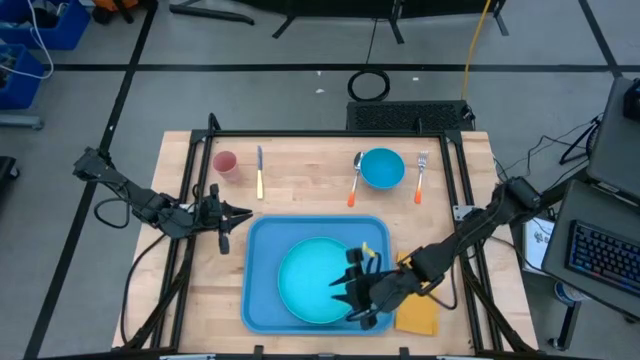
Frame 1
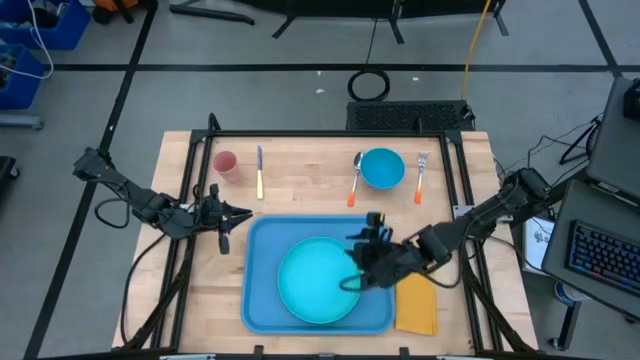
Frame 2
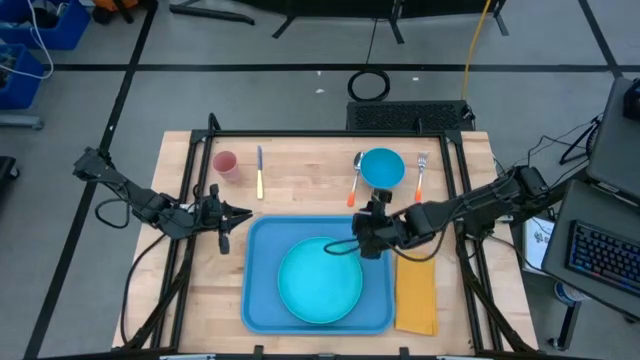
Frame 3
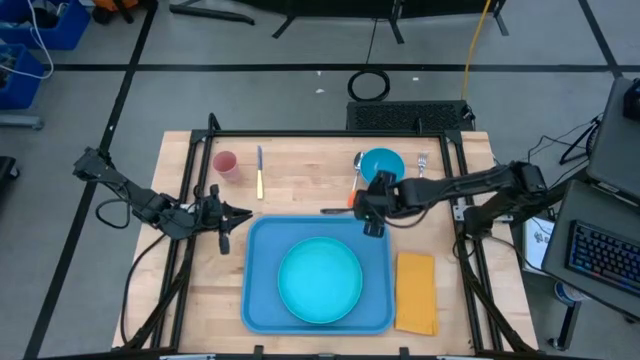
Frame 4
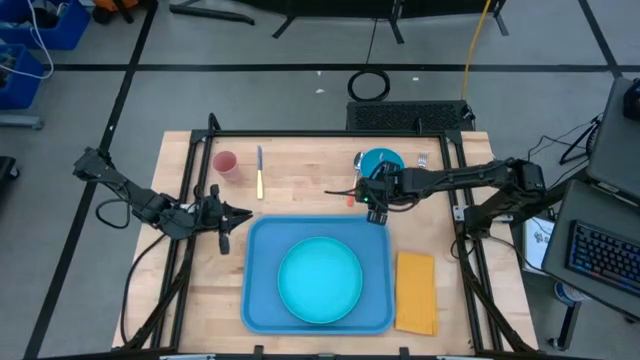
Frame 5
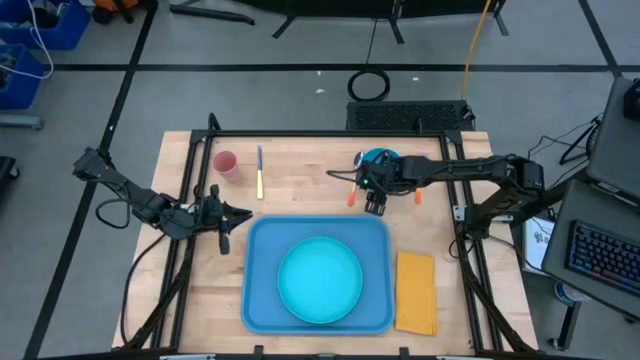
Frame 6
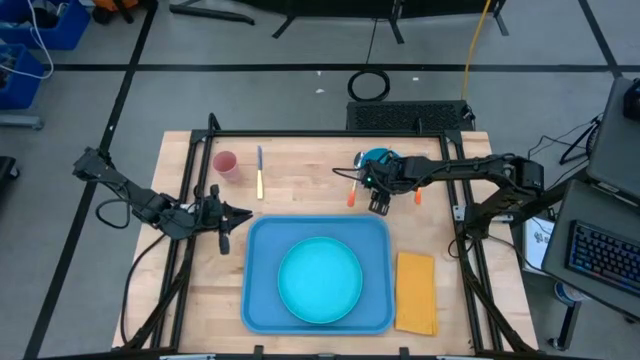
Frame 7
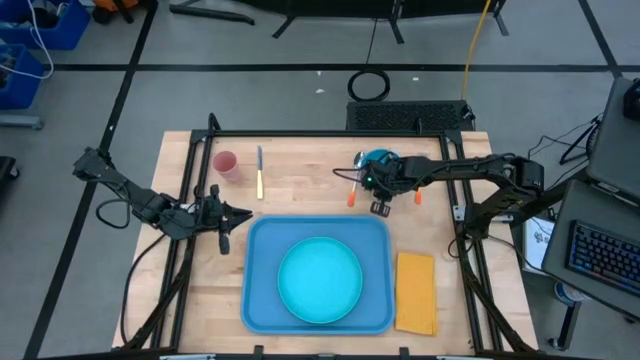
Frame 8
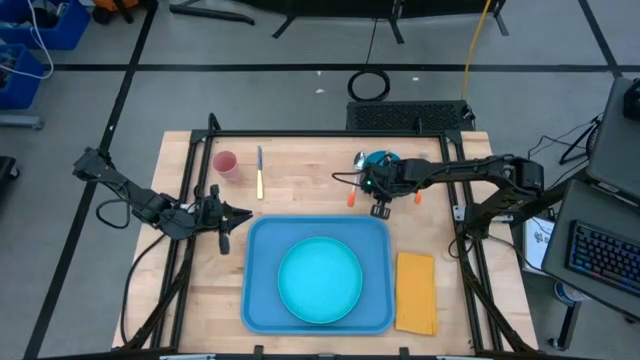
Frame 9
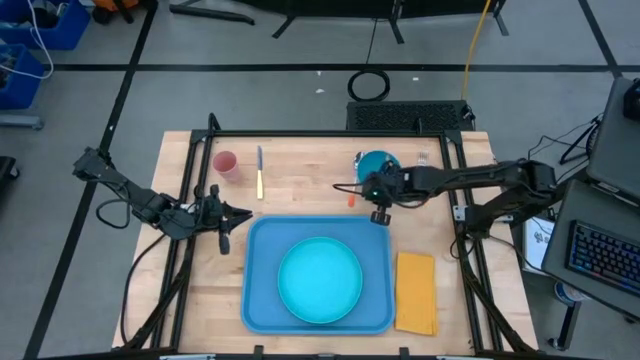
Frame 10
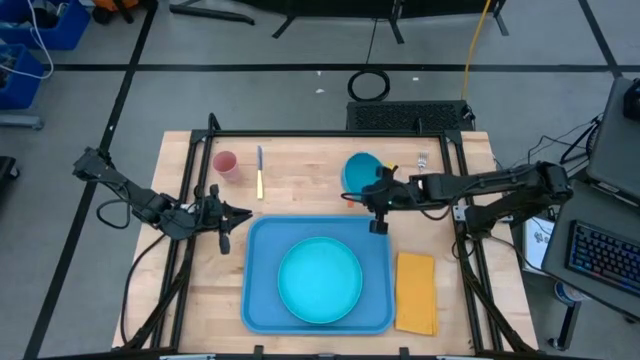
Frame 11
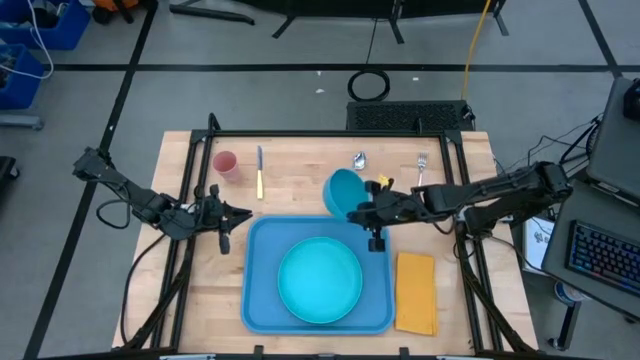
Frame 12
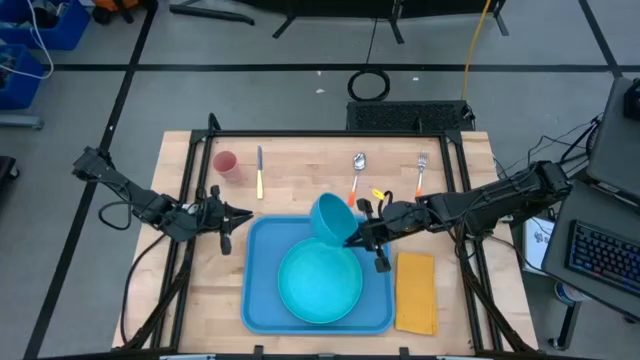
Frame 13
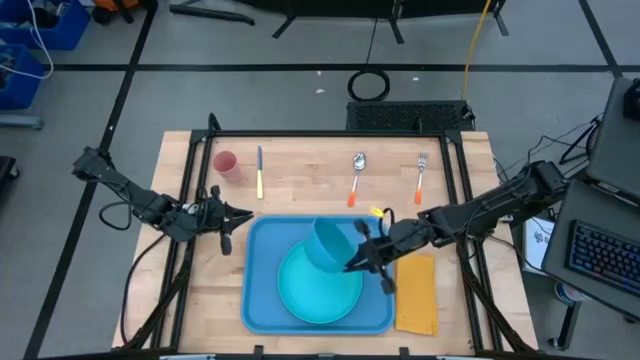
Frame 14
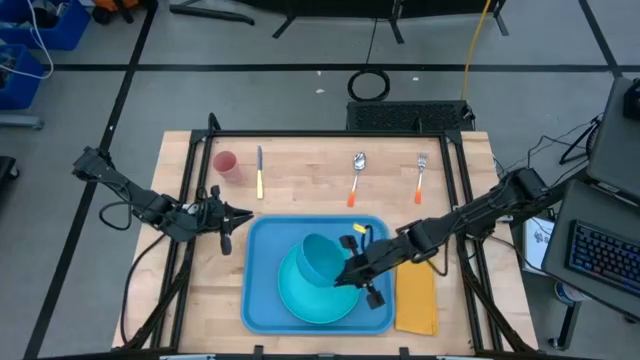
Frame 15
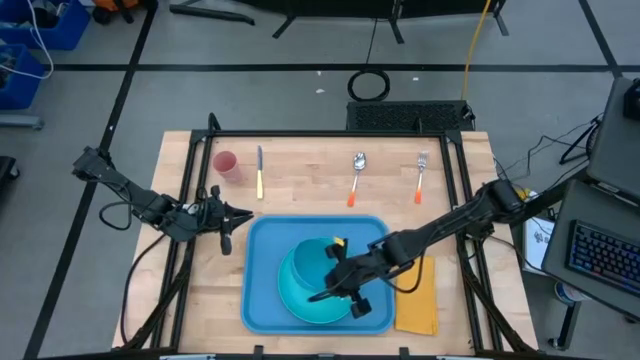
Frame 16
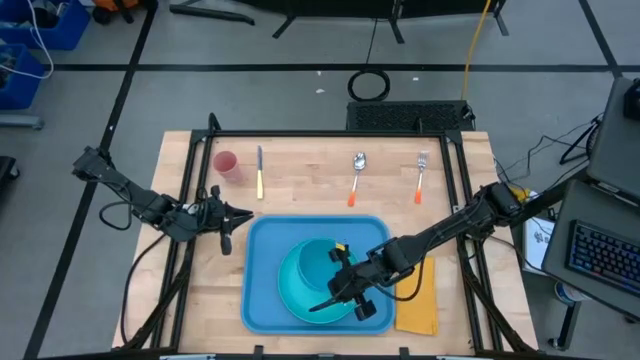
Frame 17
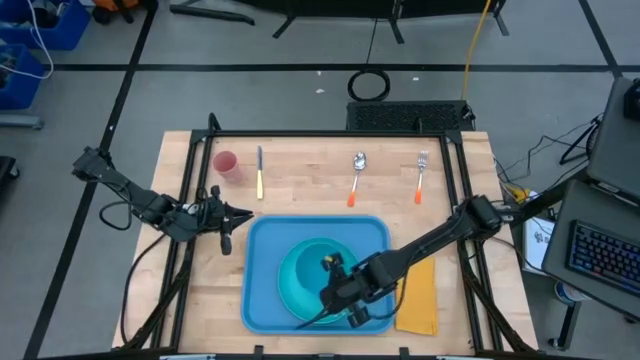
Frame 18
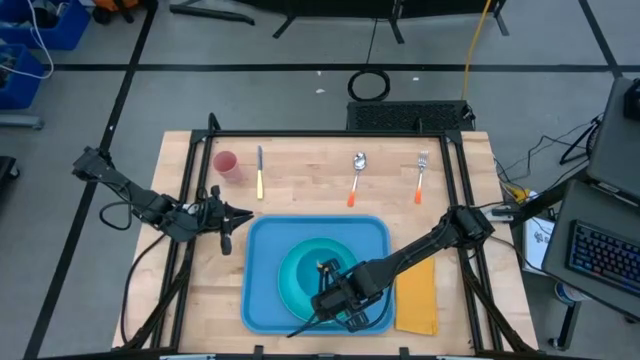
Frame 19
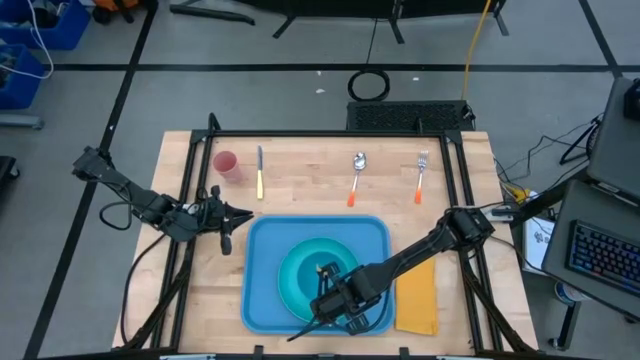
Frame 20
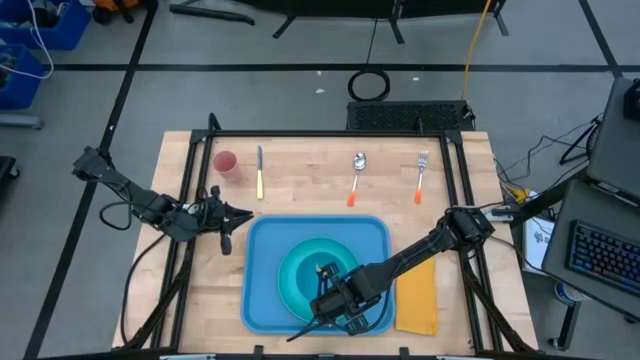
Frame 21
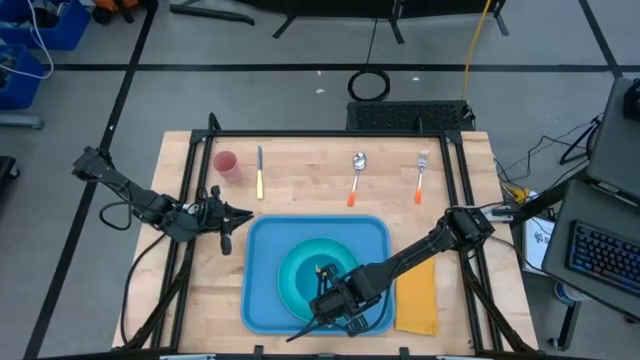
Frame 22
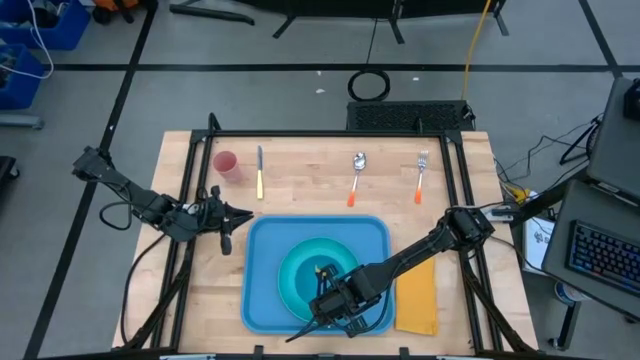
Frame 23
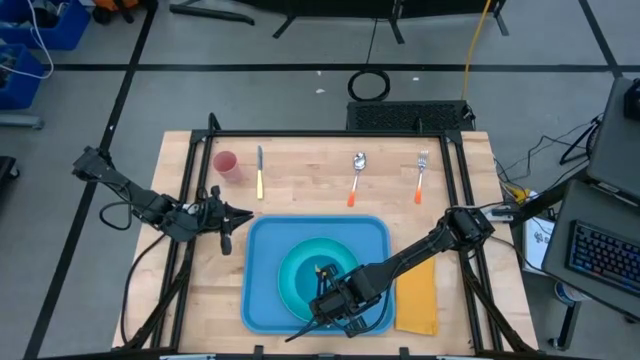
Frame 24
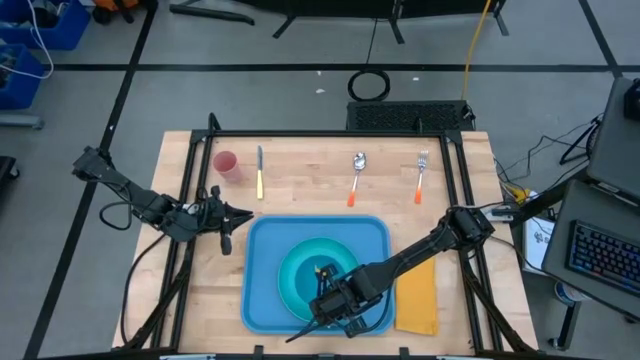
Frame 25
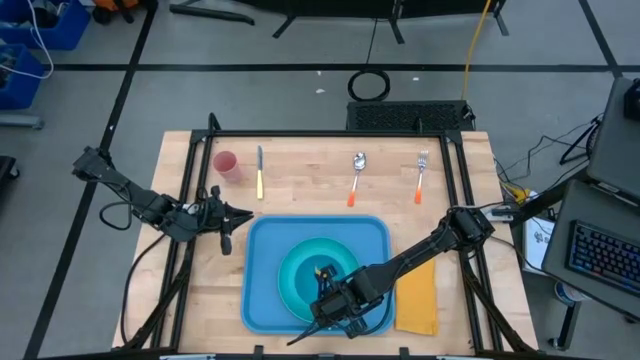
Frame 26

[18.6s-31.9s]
Task: Set up tray
Put the blue bowl on top of the light blue plate

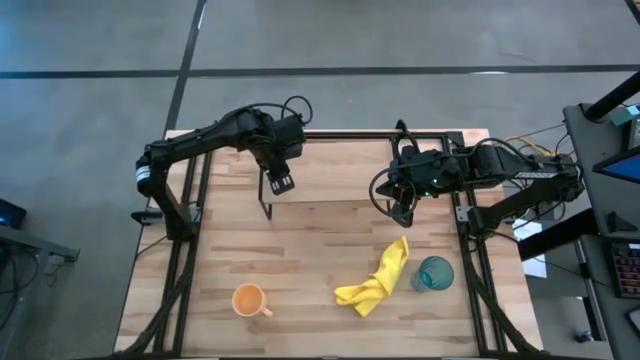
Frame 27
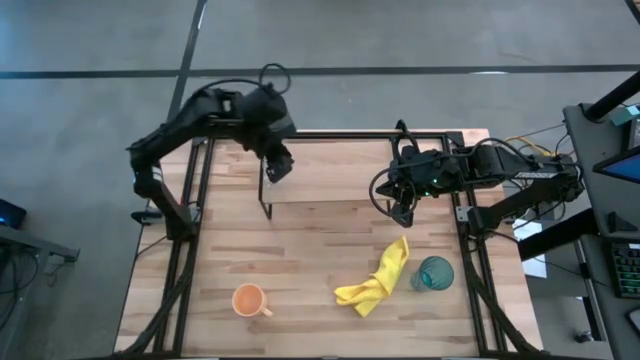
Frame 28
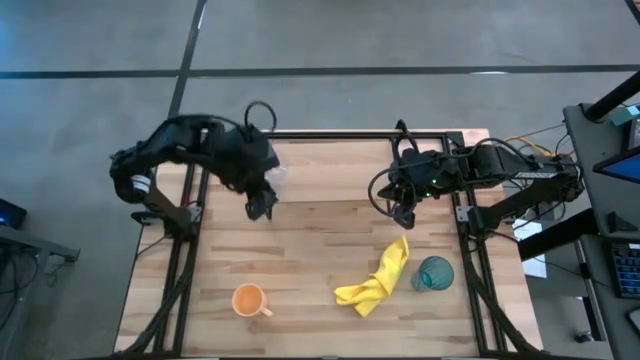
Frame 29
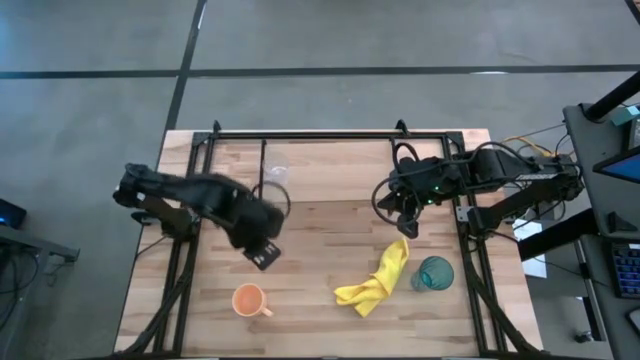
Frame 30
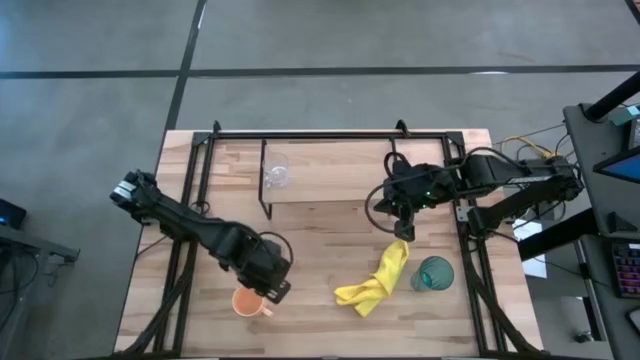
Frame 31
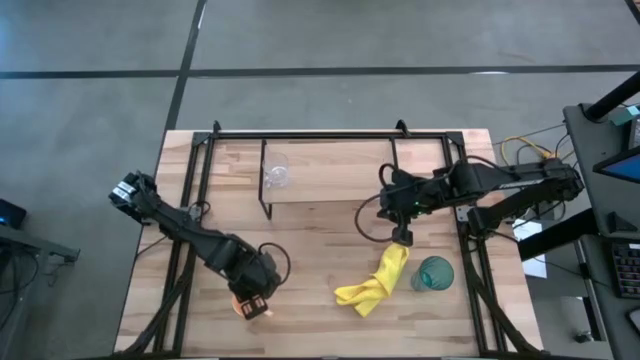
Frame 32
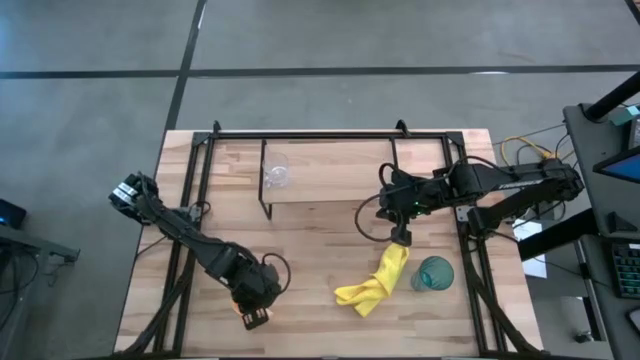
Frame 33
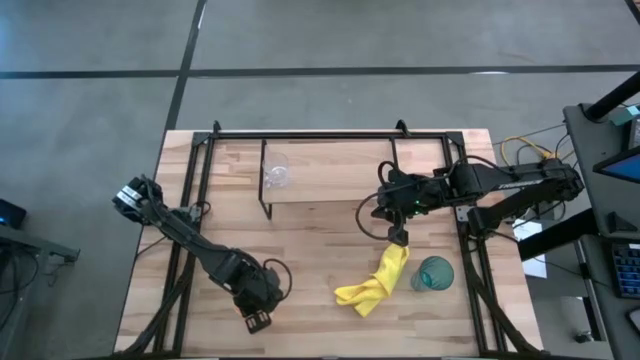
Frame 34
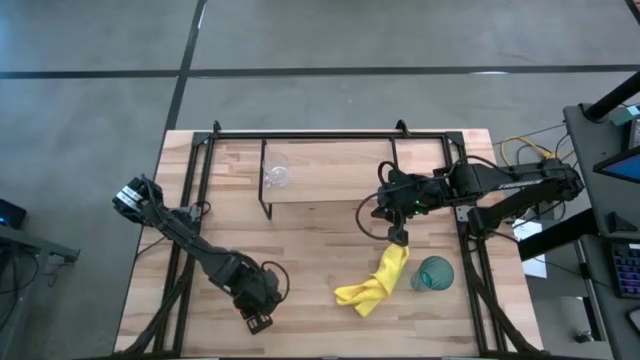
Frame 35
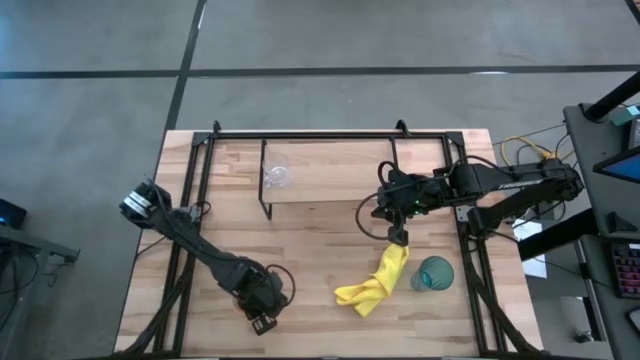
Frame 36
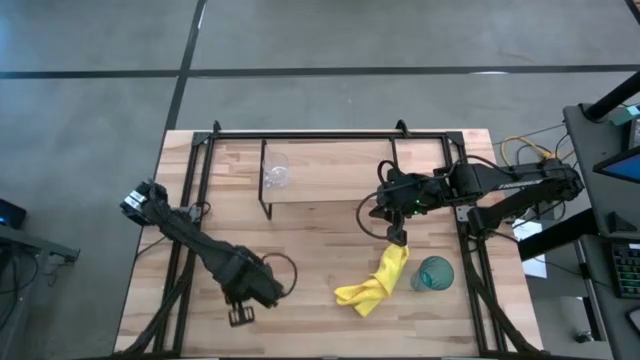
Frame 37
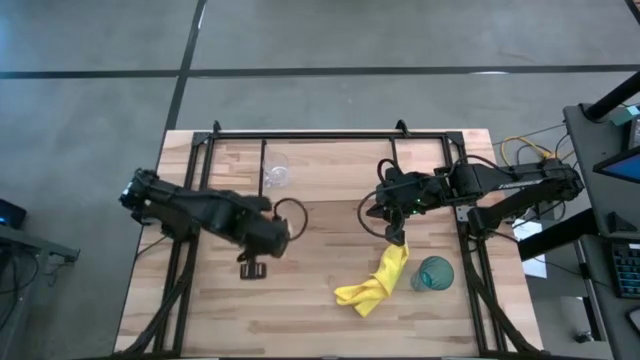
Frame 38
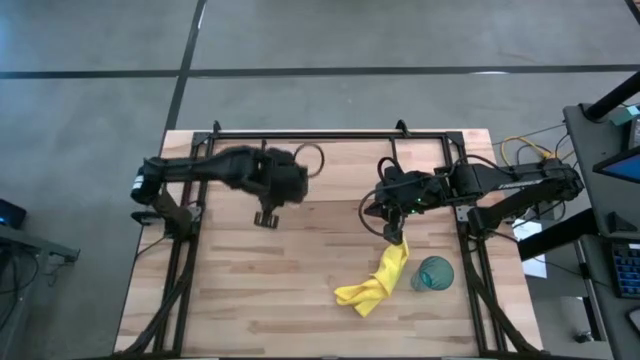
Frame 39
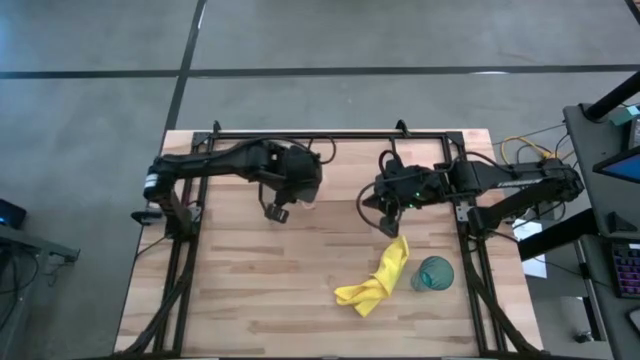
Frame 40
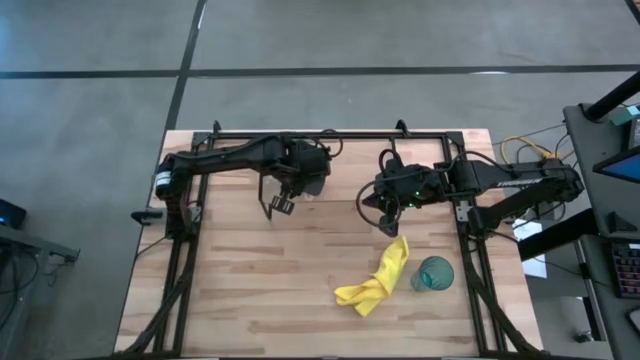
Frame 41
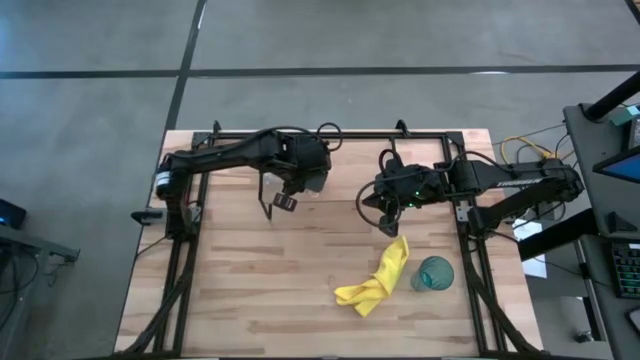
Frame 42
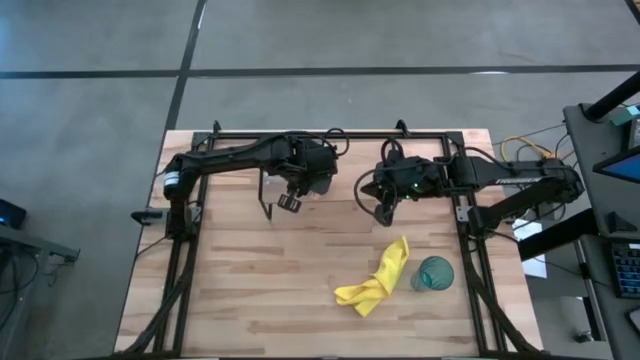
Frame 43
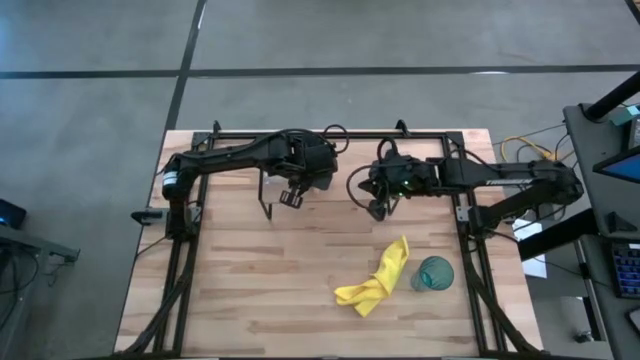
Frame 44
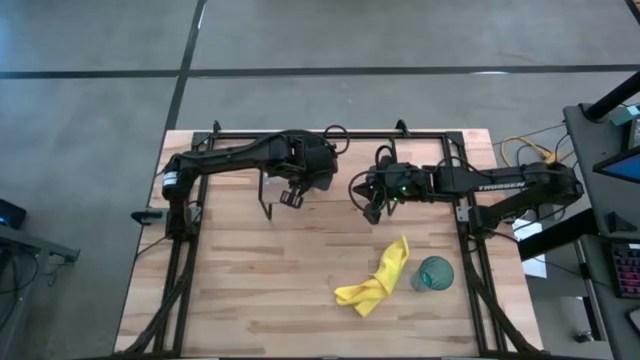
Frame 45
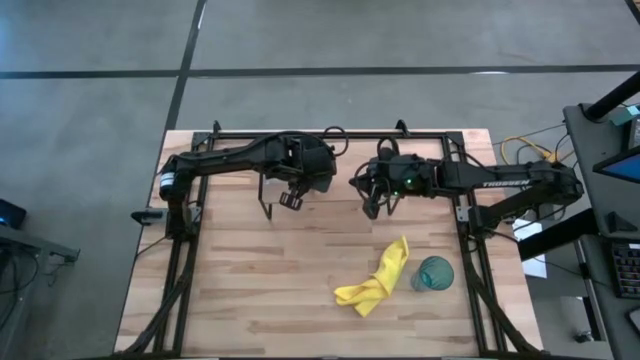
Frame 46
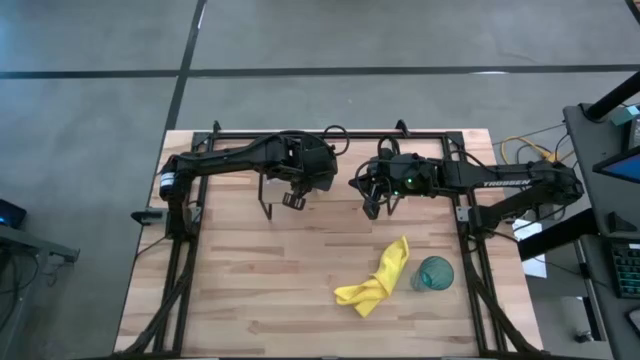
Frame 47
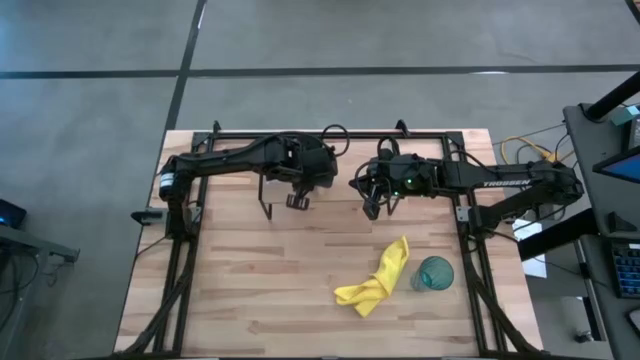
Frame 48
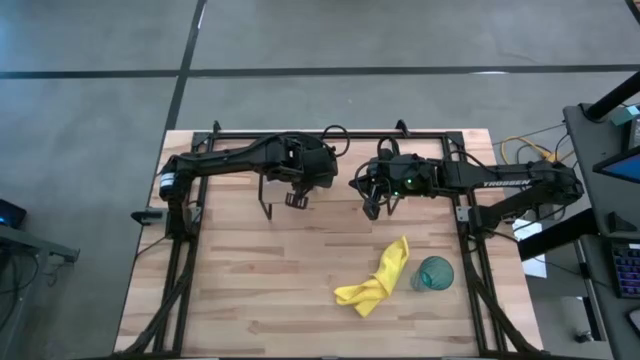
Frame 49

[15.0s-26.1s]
Task: Stack small to large cups/mugs on shelf
Put the orange mug on the shelf
